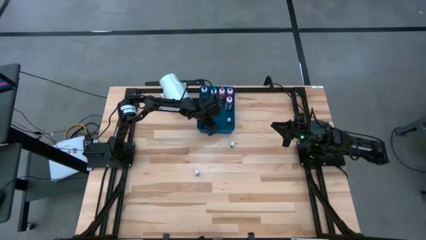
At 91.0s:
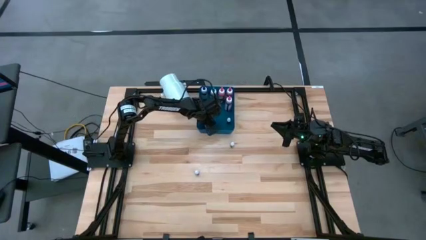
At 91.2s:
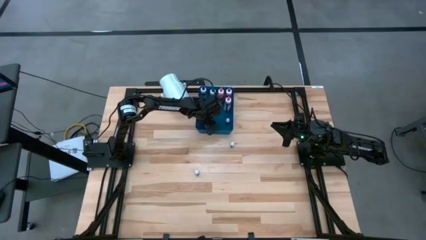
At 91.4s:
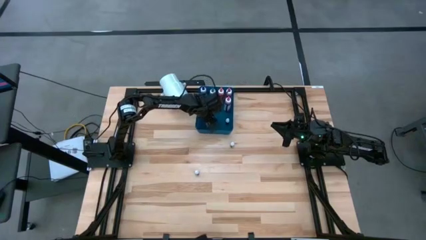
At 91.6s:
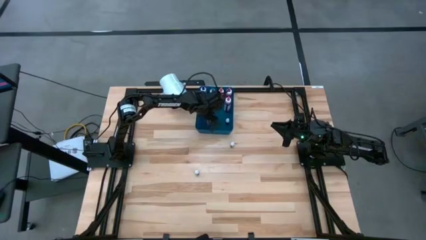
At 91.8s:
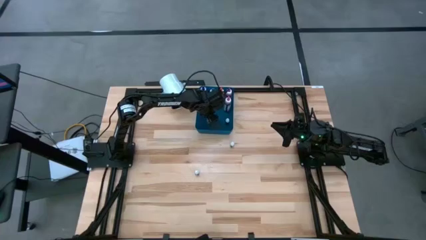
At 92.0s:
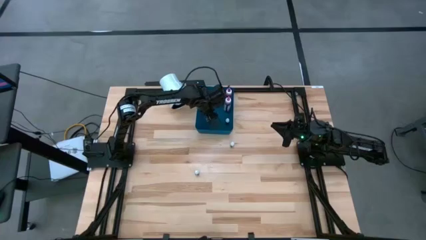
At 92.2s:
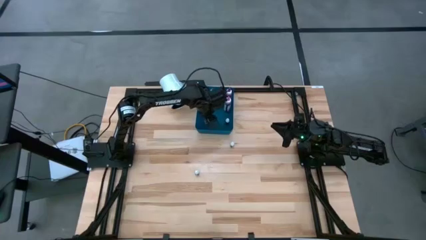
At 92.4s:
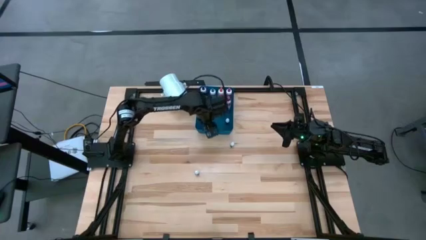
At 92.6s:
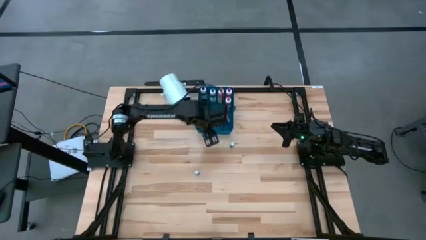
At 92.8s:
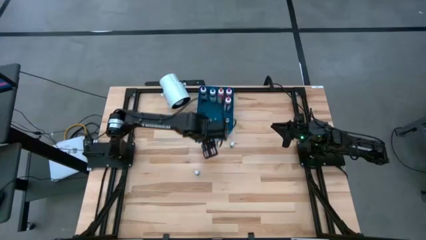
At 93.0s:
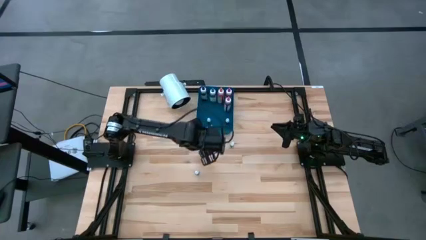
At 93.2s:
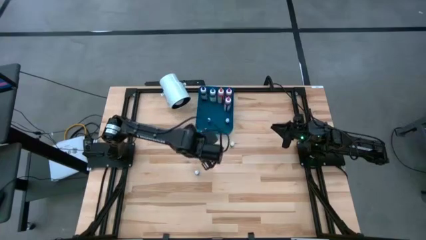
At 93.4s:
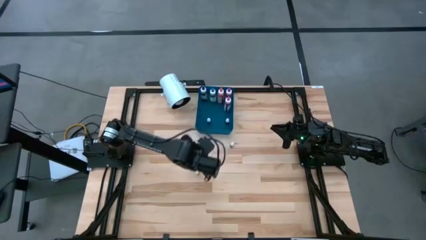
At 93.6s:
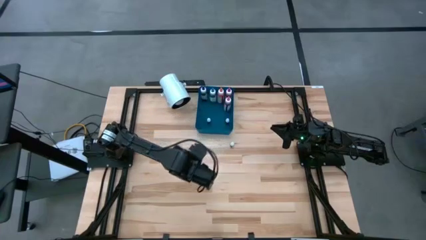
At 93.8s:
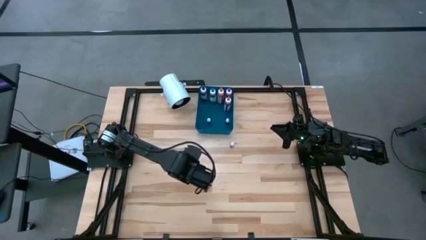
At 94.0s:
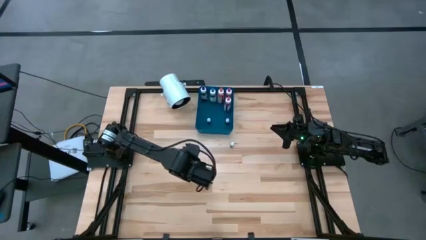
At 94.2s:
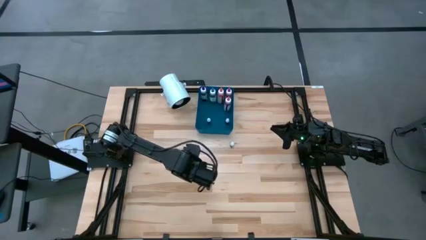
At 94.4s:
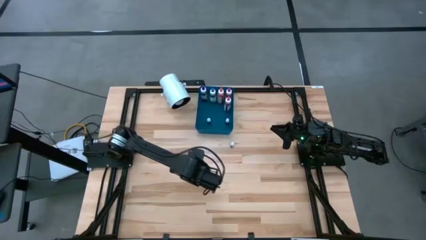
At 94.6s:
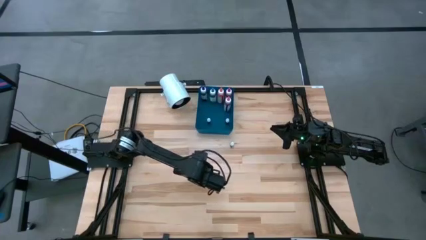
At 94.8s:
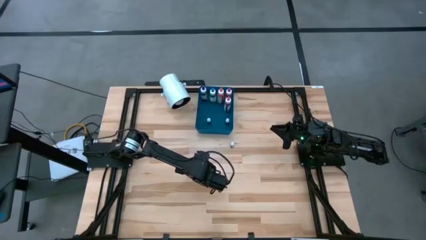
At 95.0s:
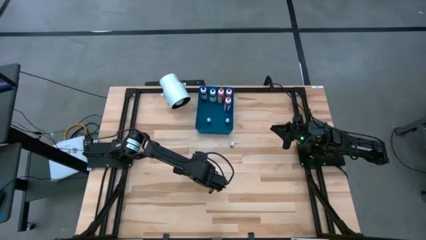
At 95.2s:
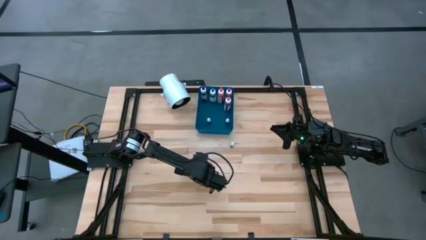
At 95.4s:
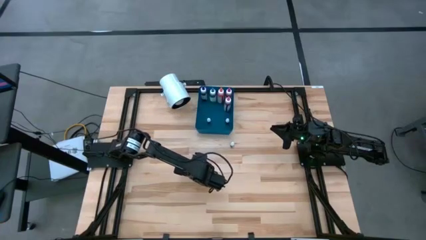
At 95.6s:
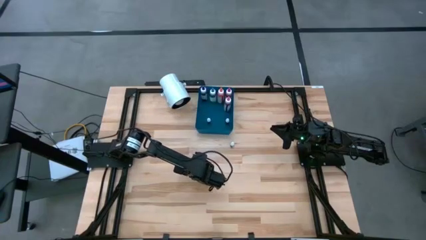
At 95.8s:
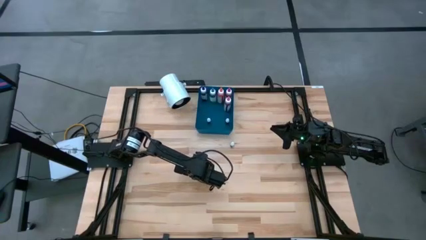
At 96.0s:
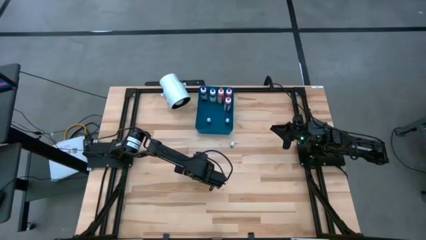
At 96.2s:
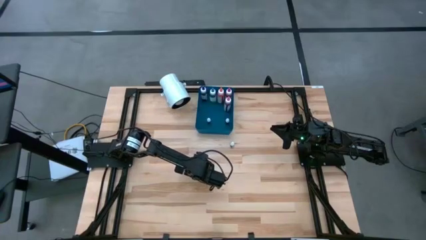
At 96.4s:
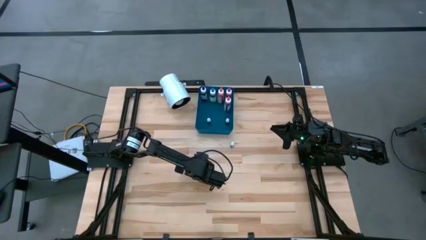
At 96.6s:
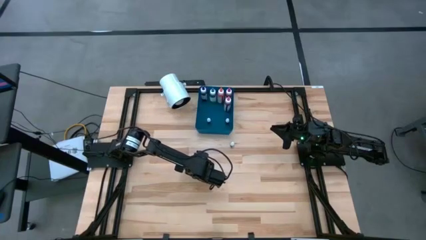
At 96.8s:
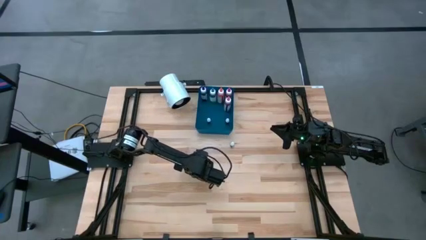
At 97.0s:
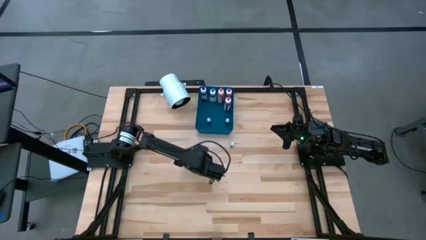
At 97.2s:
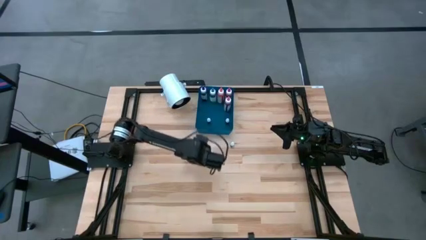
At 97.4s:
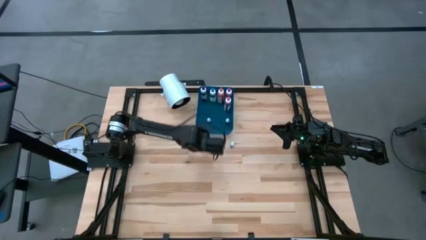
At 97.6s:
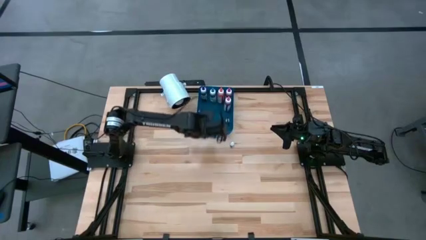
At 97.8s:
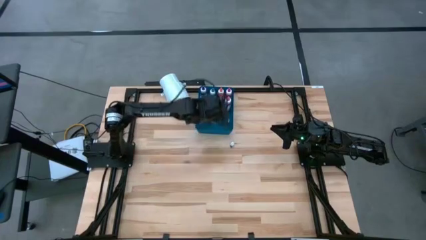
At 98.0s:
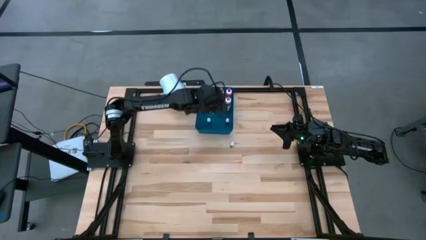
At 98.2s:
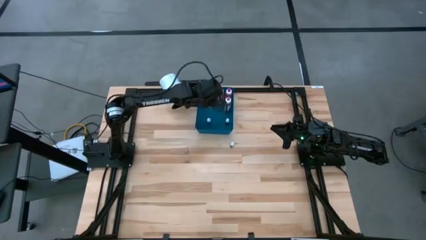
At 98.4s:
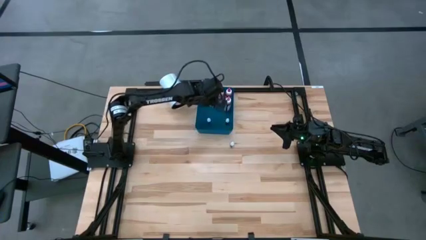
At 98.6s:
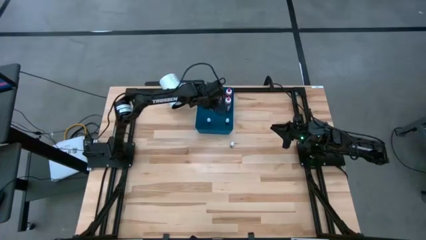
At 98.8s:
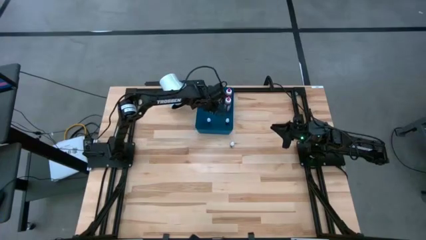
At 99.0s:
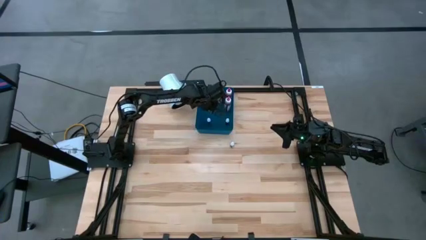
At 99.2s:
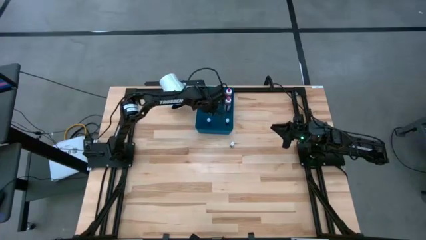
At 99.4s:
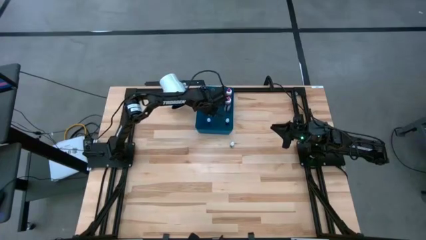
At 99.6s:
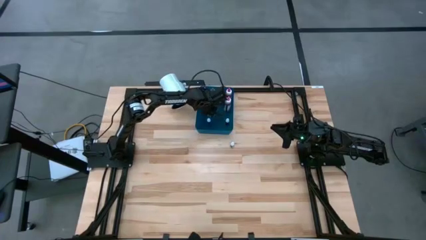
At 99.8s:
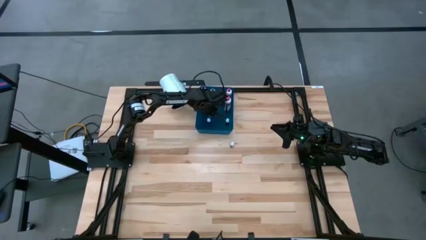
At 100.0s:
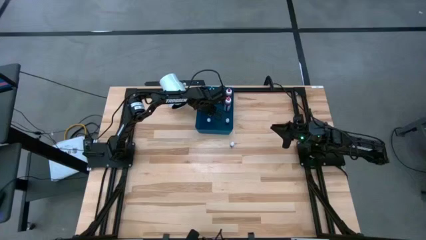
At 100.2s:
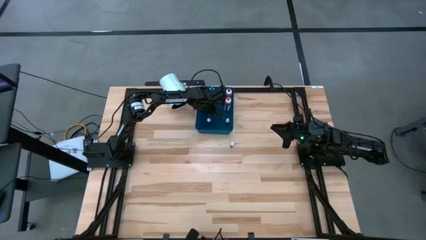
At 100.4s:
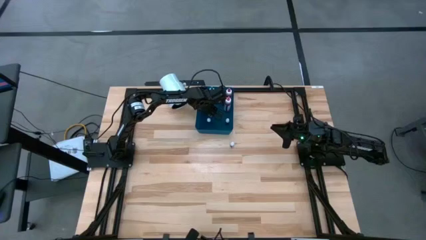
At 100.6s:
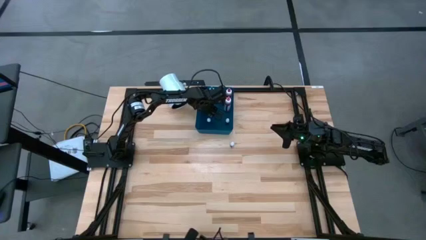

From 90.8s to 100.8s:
Task: Pick & Place food coloring
Put the small black food coloring bottle into the blue bin

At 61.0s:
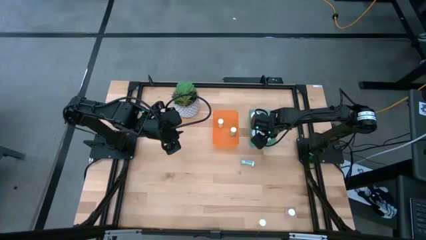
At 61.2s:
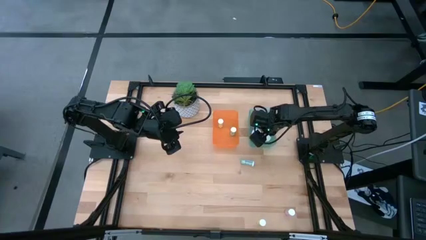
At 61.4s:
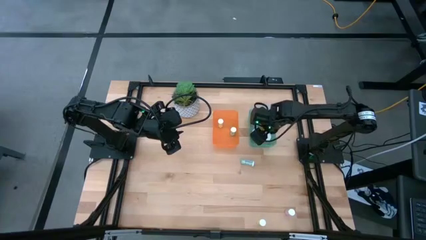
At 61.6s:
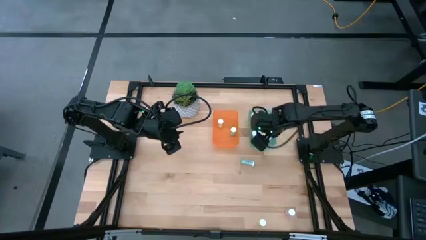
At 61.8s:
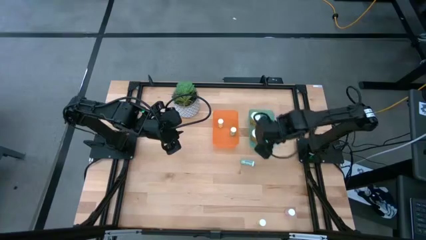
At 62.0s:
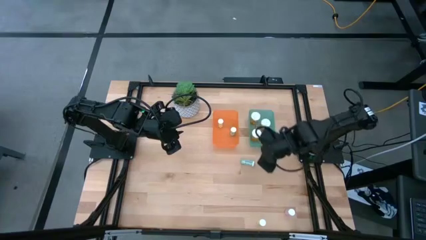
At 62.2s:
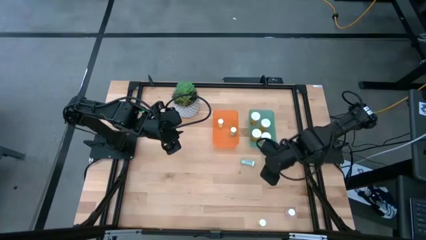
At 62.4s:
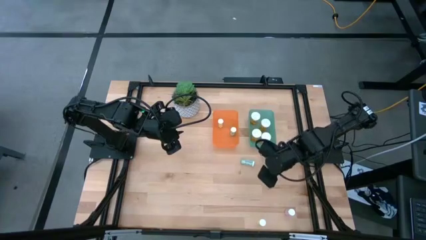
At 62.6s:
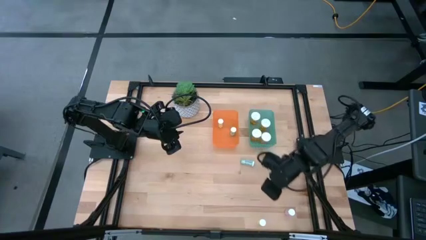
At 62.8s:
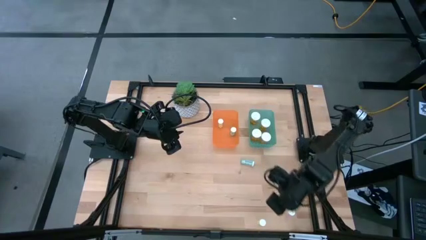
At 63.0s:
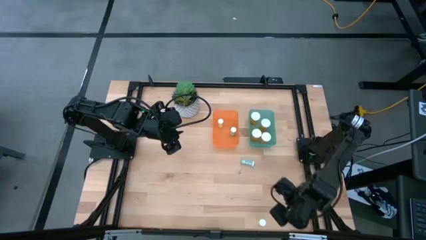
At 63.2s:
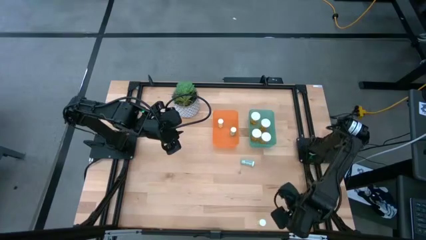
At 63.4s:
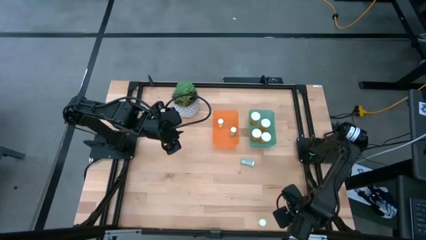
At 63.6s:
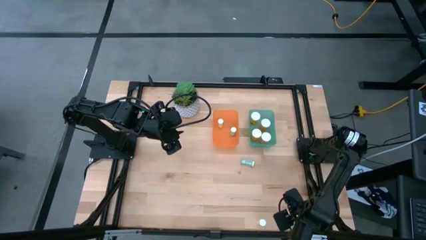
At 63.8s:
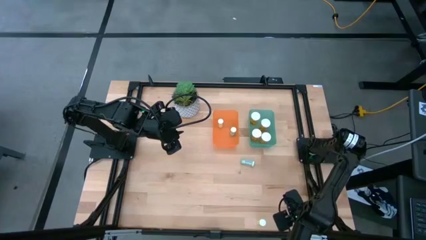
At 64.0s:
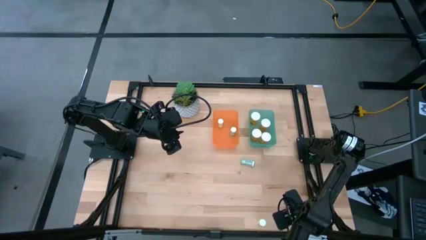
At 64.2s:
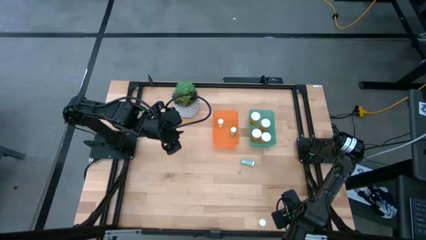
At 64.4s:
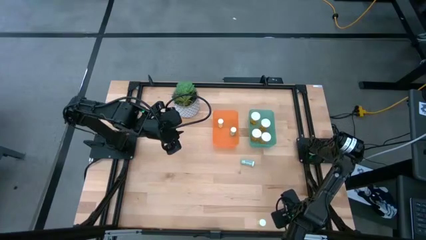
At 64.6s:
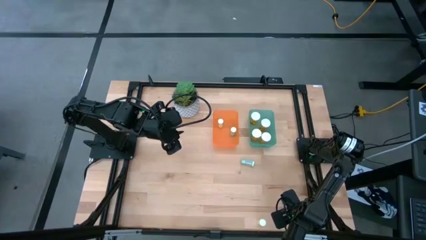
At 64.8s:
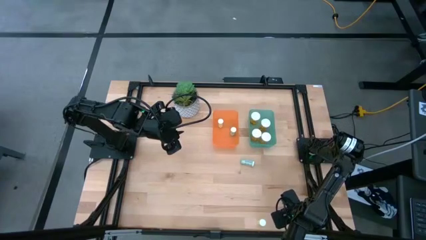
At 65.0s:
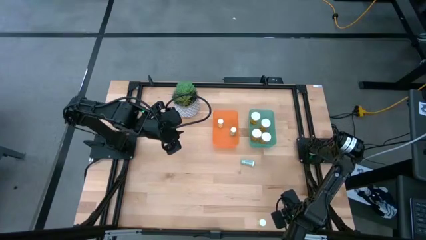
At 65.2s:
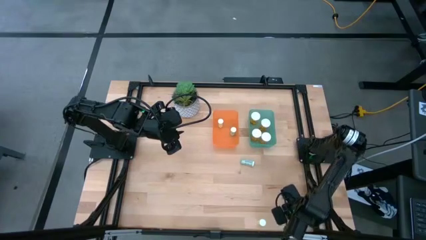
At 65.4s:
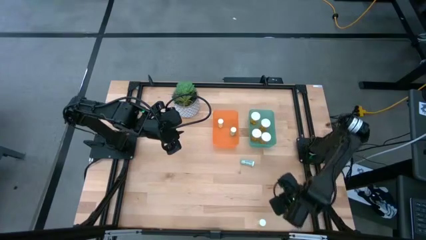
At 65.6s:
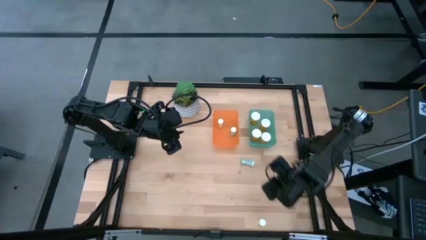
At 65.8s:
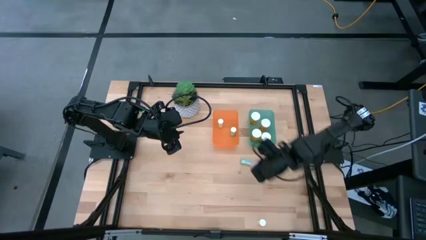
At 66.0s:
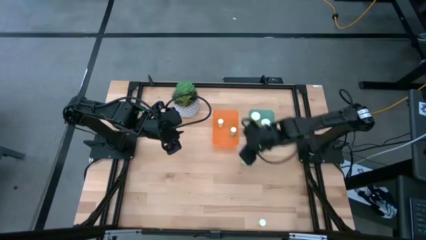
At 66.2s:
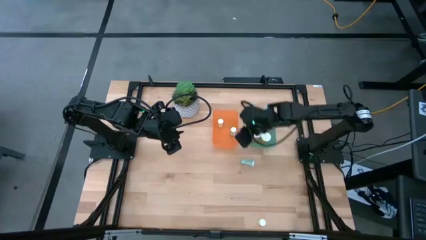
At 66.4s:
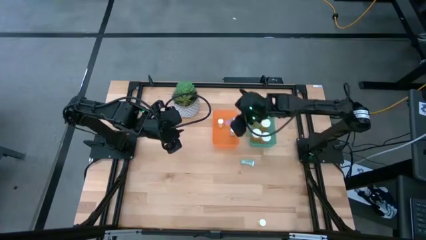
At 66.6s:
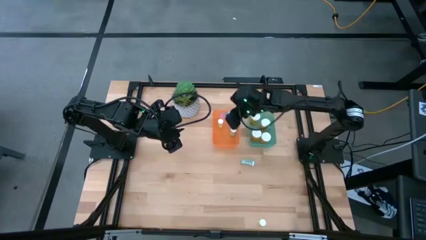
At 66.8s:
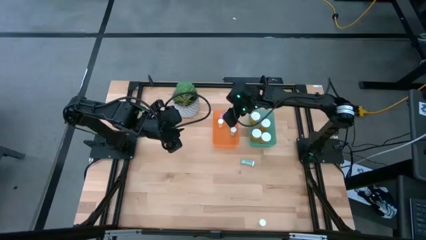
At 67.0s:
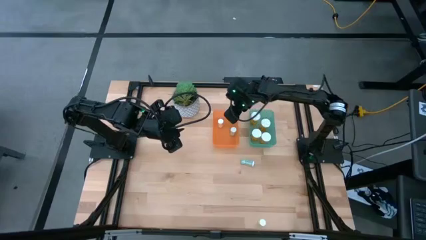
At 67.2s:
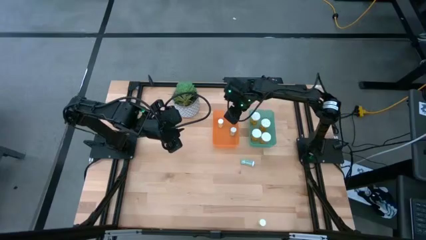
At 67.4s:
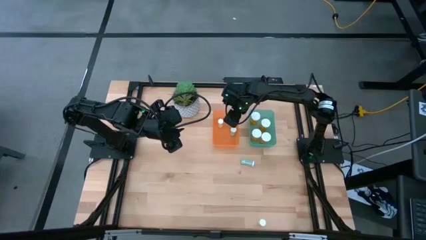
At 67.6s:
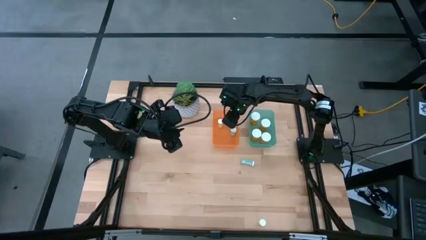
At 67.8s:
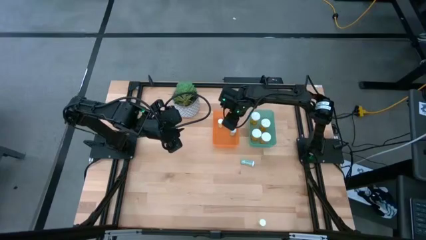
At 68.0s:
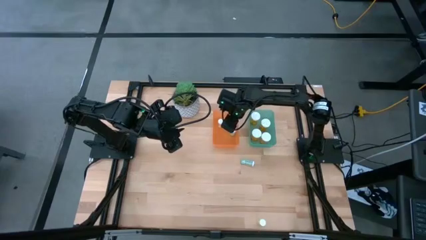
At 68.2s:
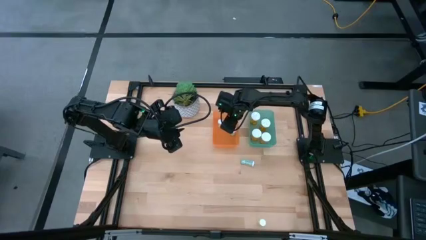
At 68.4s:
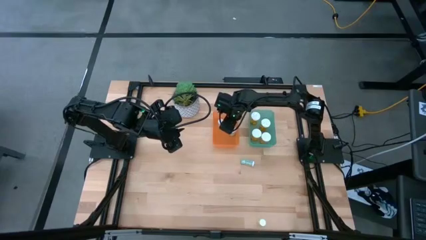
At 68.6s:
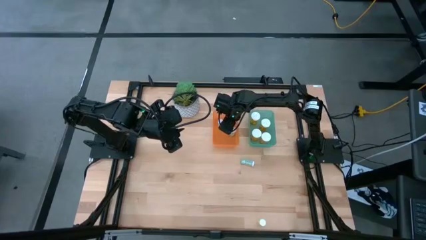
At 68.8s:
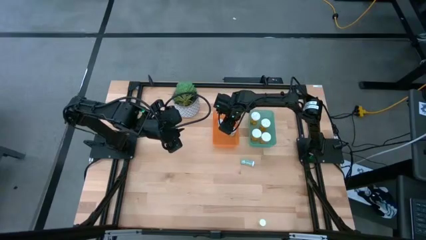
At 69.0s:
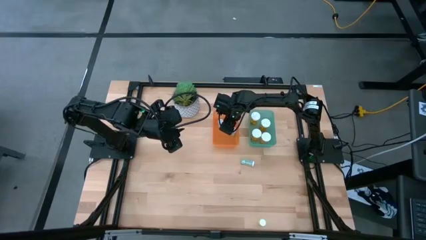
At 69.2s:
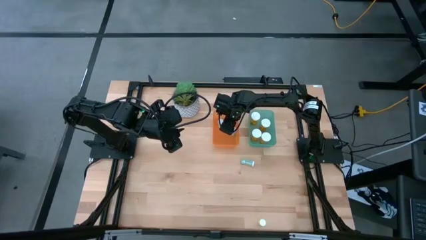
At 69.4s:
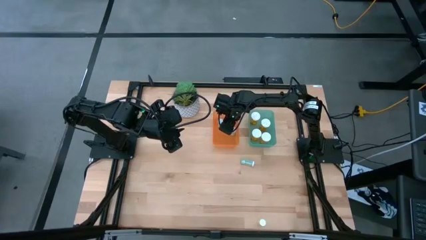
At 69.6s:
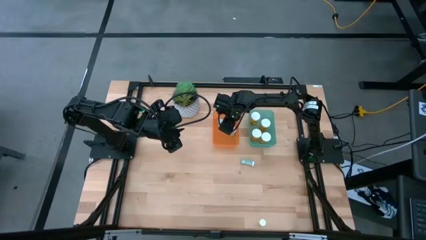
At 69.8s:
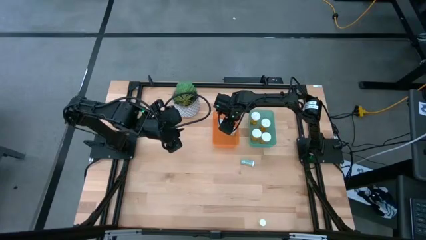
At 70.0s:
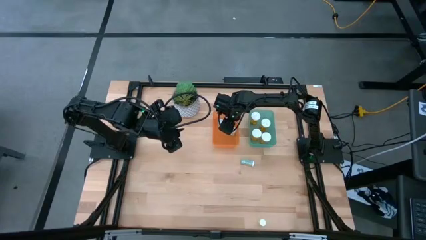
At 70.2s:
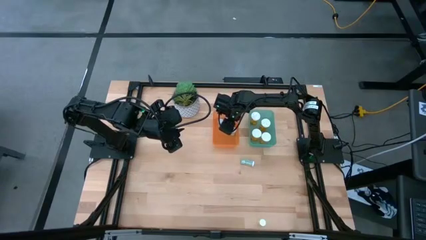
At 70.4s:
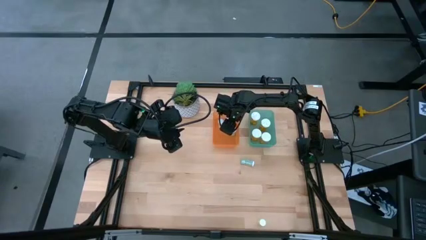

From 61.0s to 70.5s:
Task: Pick and place medicine bottles into bin by pill shape (circle, oval)
Put the small pink bottle into the orange bin
